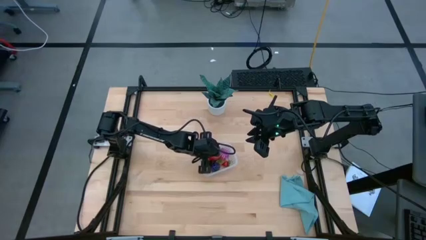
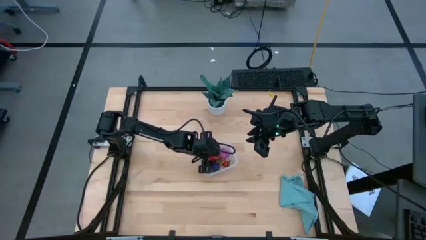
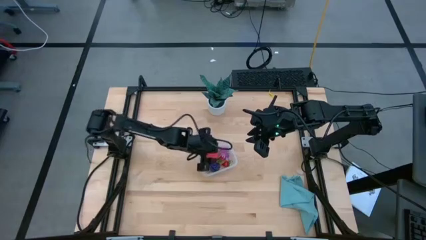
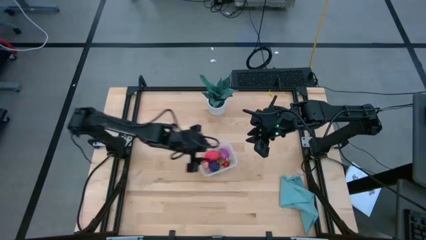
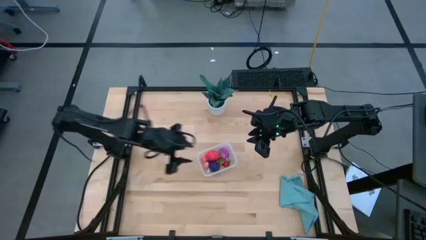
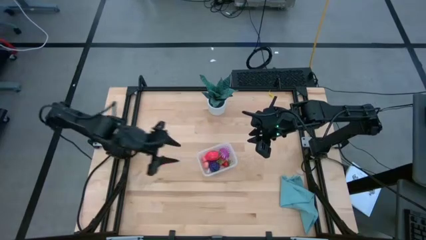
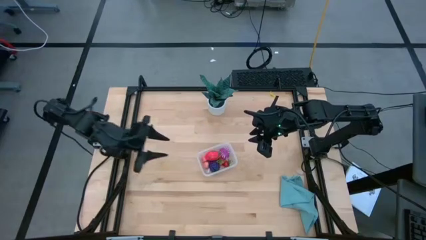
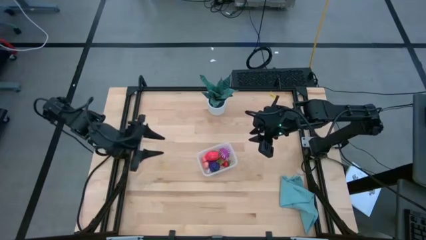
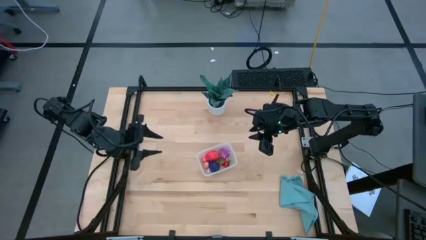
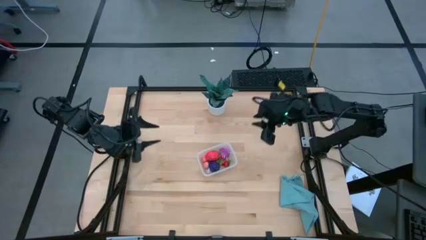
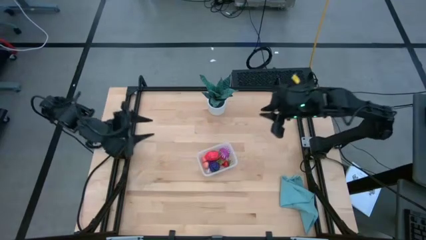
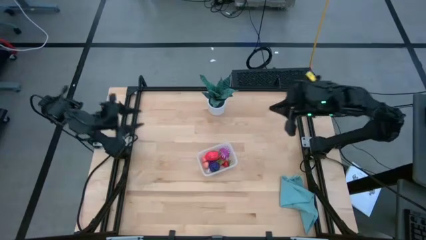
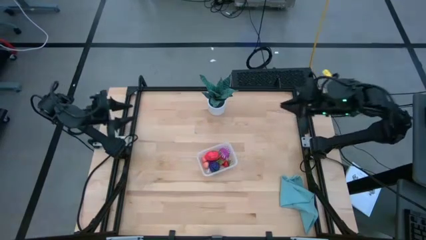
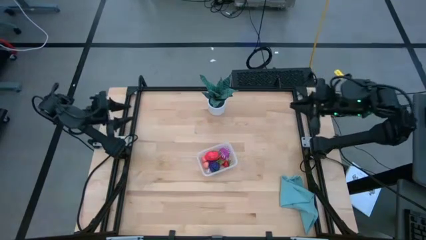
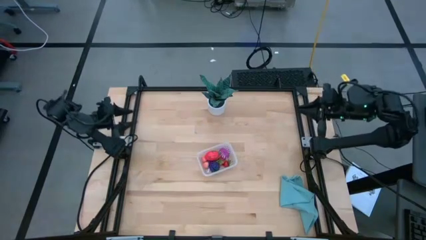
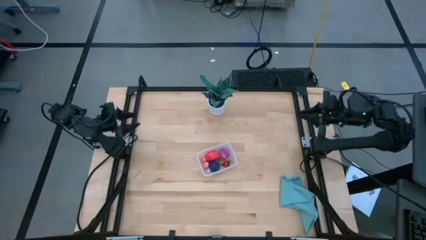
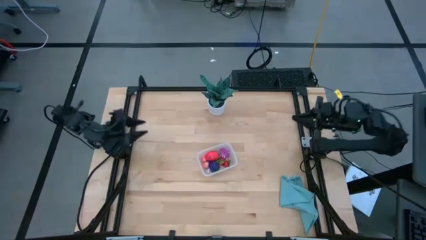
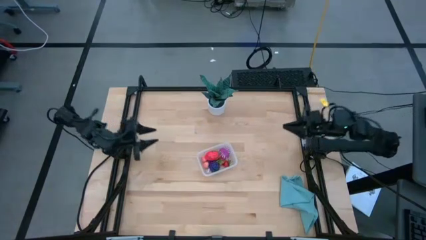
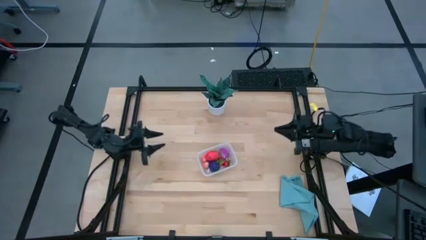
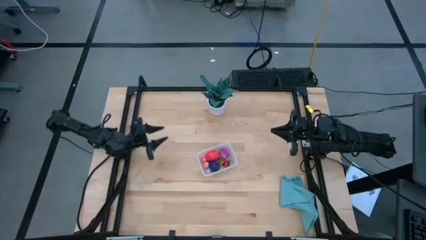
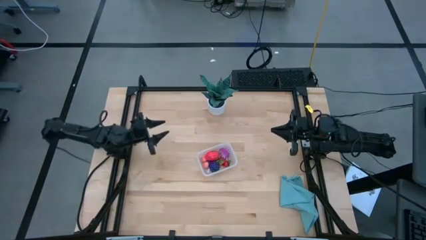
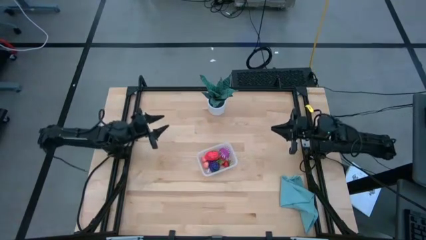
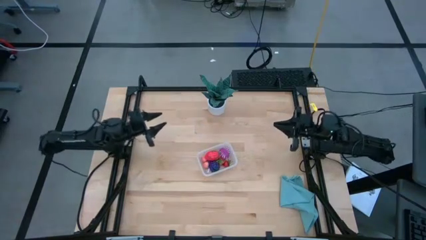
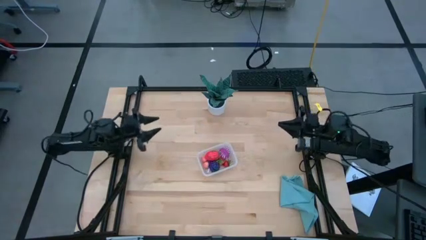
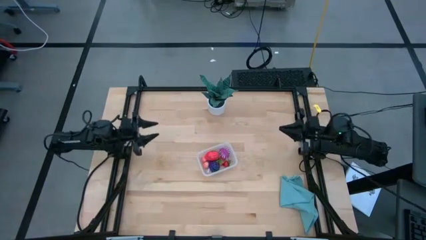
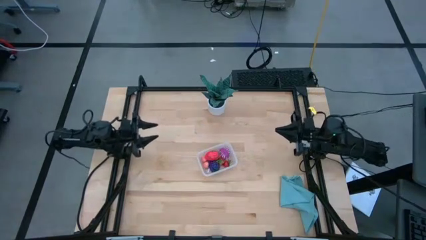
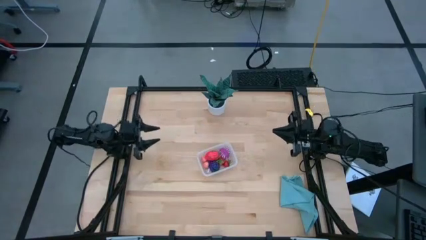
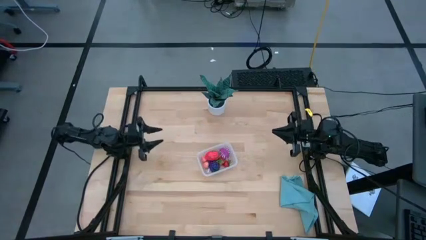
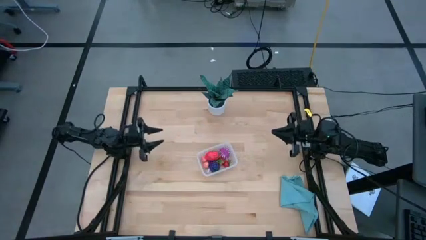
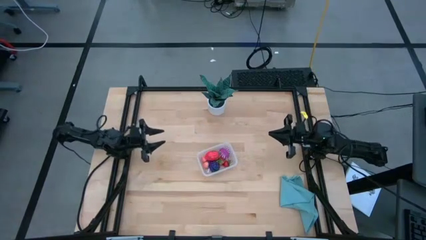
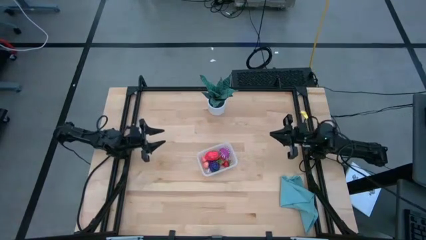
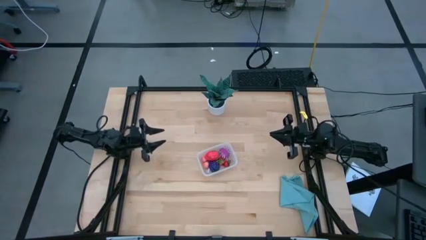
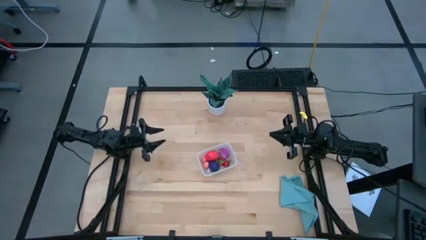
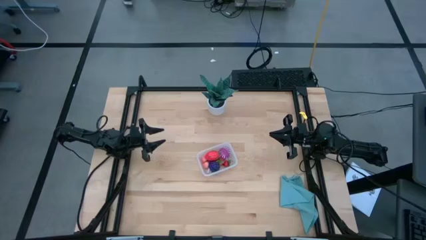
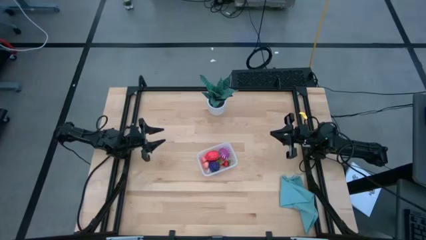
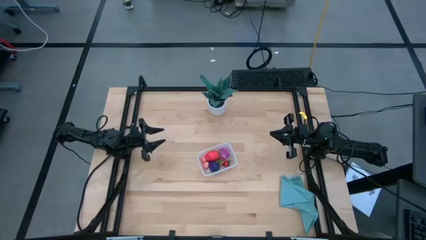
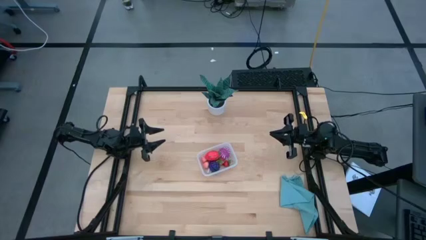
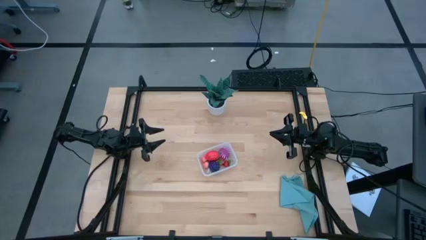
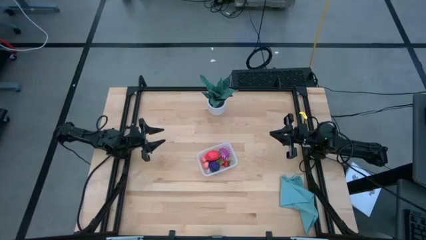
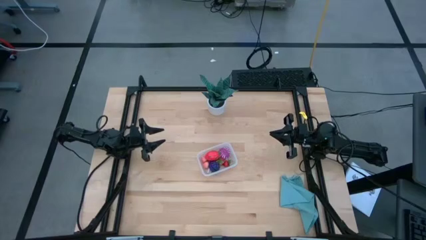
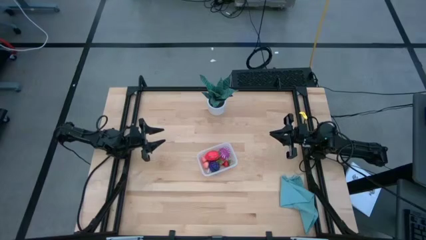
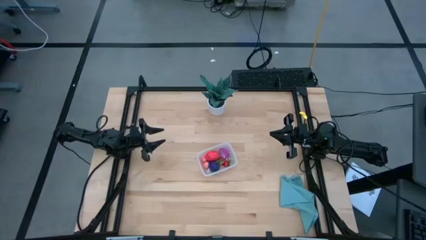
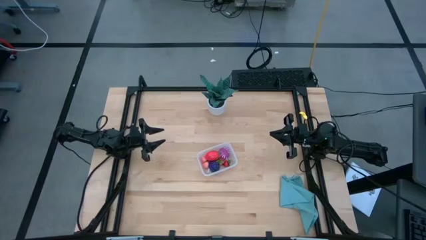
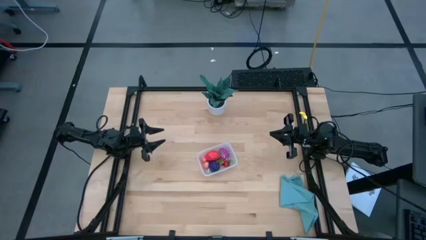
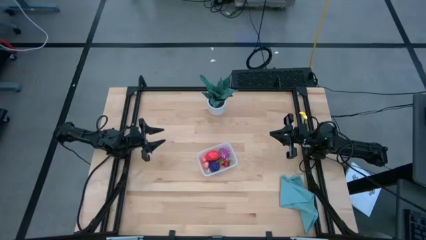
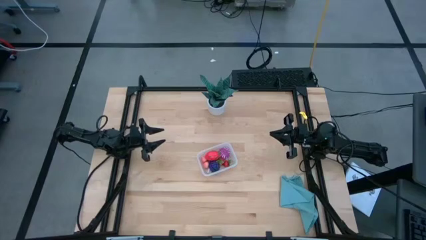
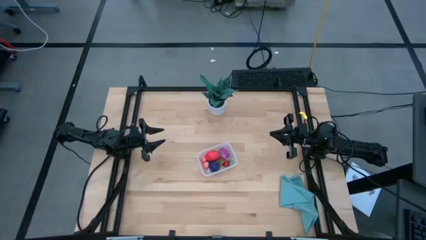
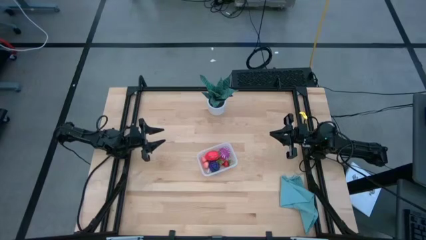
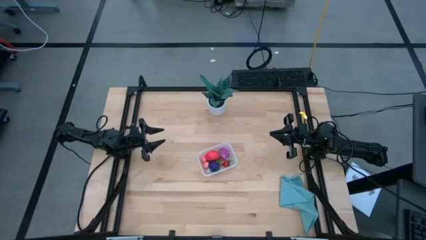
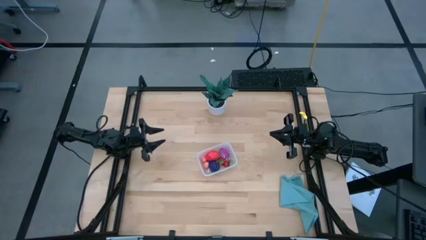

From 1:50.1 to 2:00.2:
Task: Pick and placing Produce into tupperware
Return to Home Position
